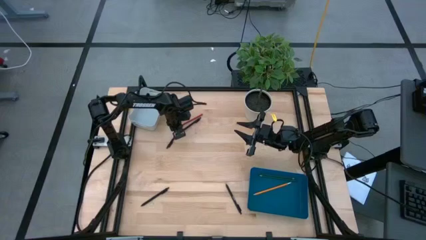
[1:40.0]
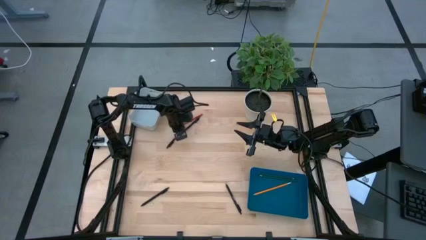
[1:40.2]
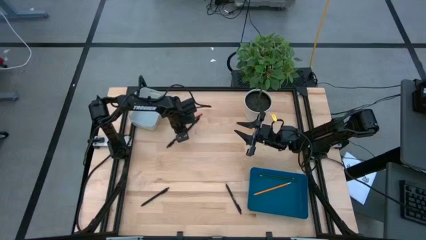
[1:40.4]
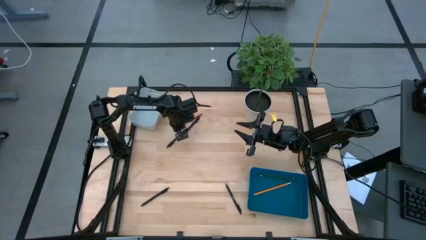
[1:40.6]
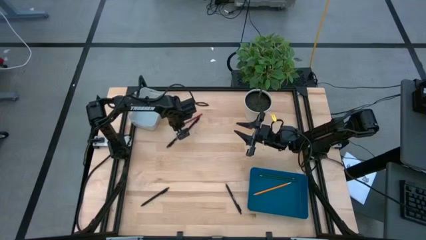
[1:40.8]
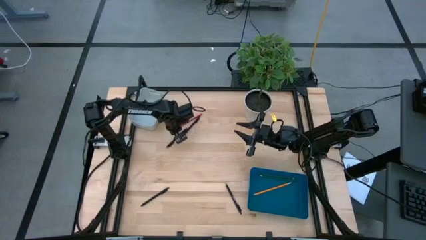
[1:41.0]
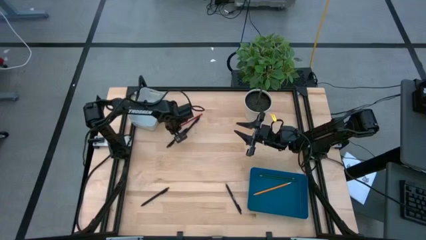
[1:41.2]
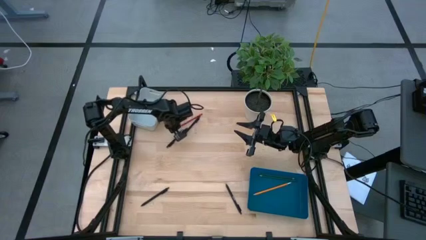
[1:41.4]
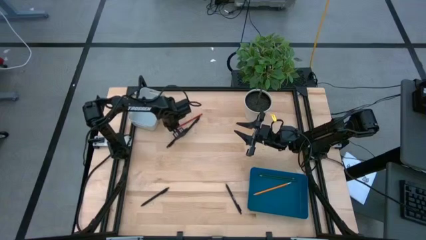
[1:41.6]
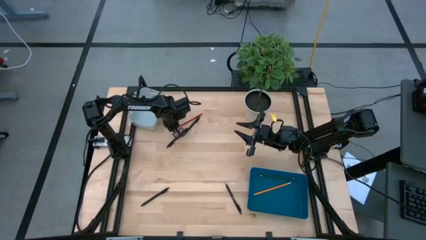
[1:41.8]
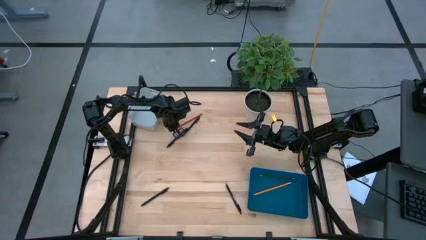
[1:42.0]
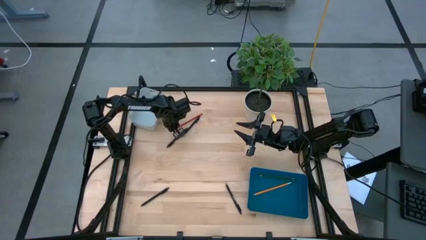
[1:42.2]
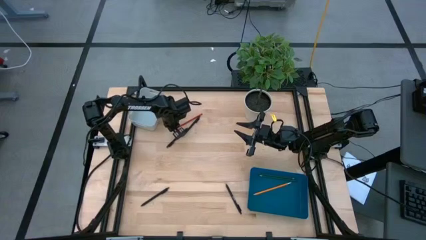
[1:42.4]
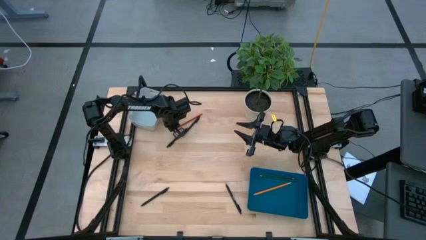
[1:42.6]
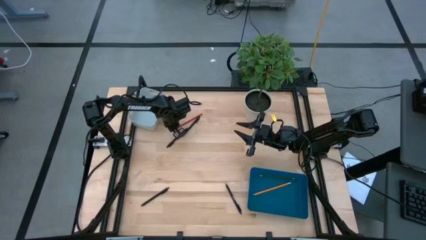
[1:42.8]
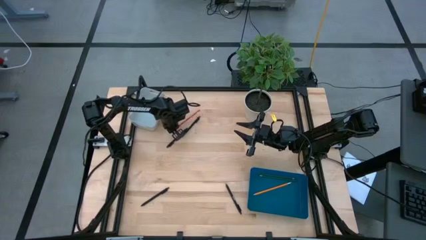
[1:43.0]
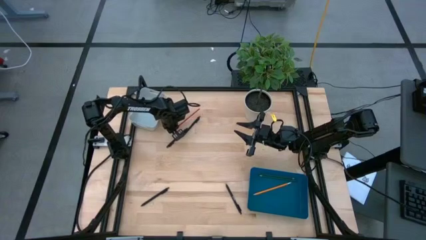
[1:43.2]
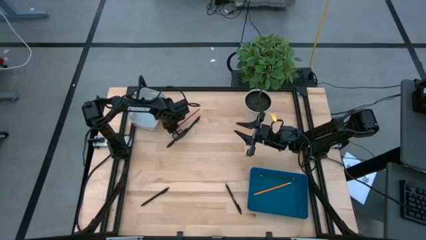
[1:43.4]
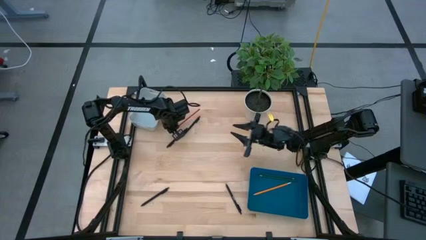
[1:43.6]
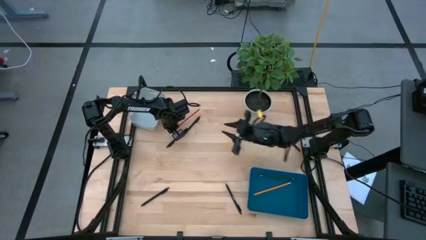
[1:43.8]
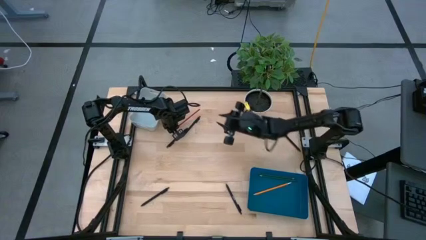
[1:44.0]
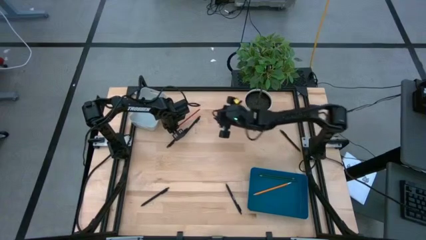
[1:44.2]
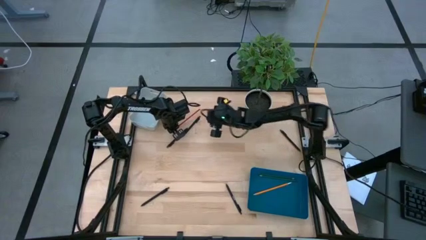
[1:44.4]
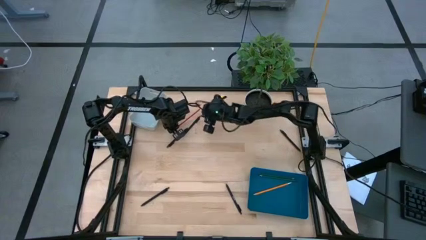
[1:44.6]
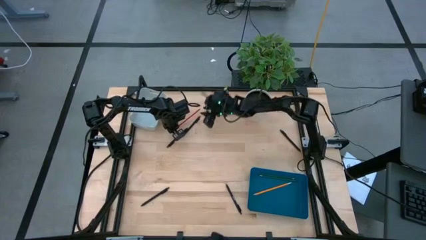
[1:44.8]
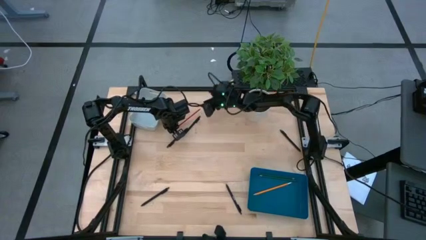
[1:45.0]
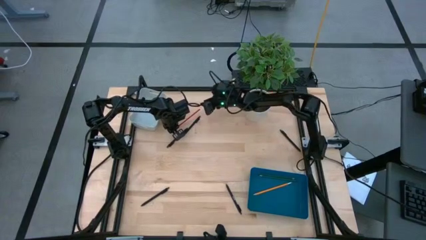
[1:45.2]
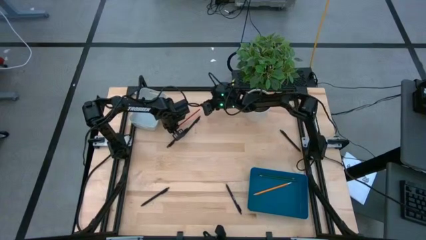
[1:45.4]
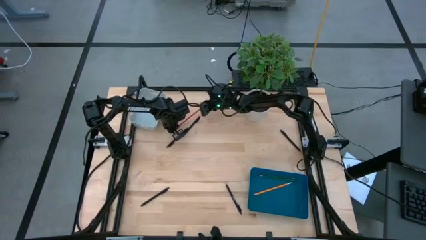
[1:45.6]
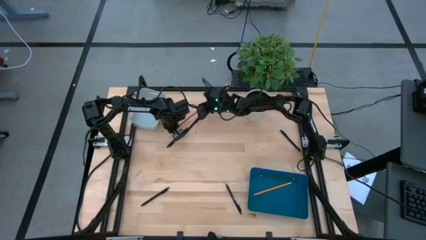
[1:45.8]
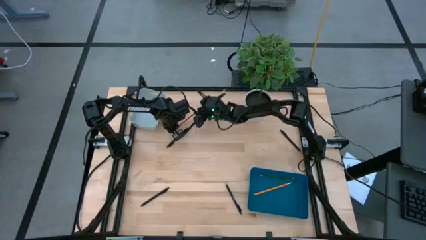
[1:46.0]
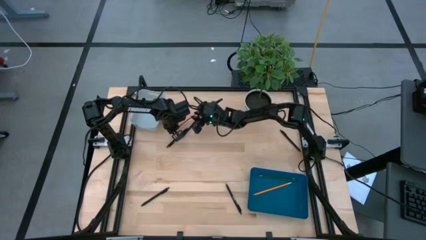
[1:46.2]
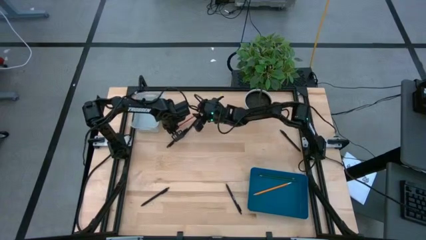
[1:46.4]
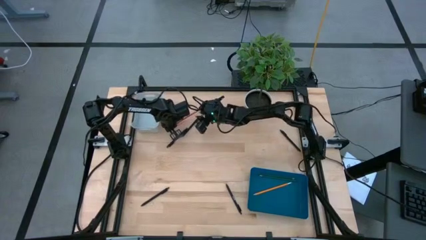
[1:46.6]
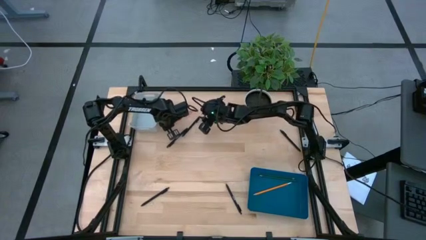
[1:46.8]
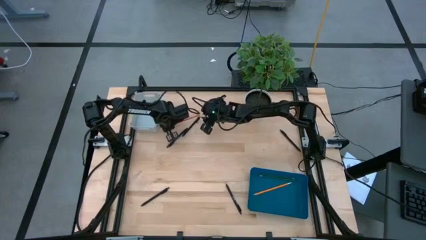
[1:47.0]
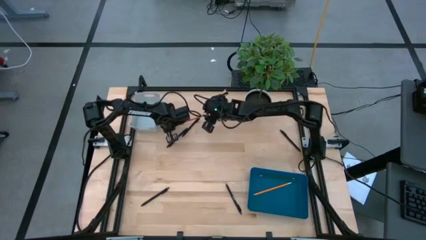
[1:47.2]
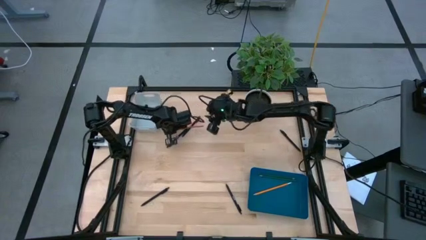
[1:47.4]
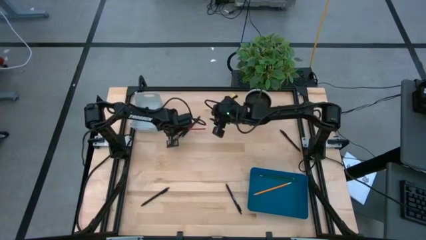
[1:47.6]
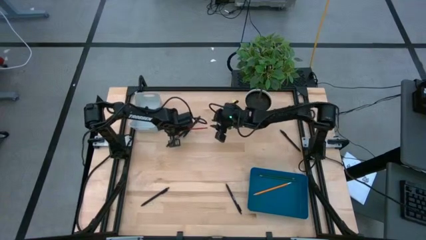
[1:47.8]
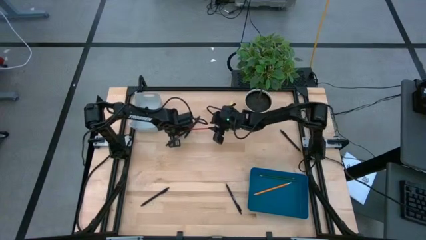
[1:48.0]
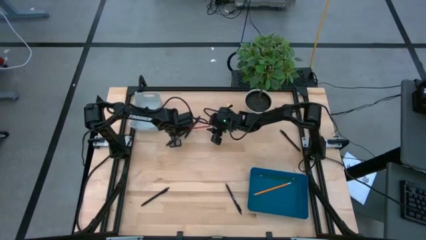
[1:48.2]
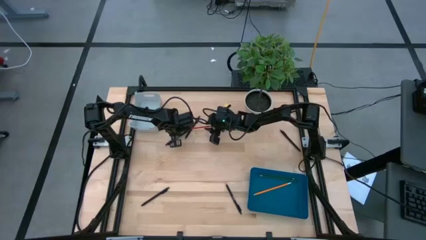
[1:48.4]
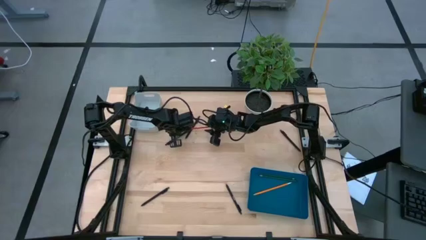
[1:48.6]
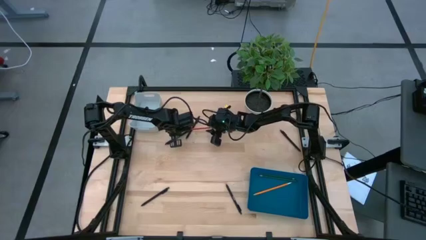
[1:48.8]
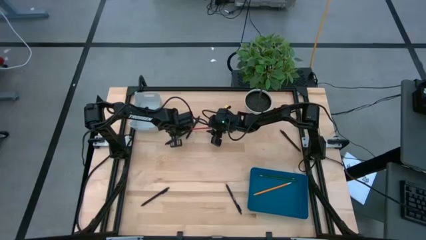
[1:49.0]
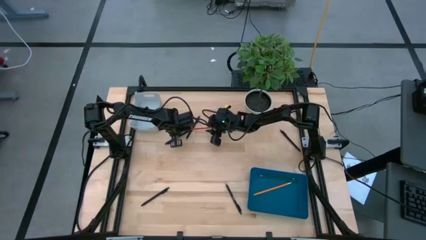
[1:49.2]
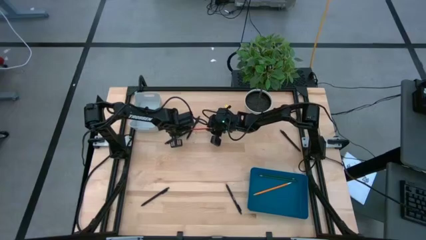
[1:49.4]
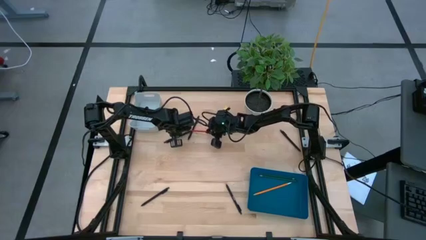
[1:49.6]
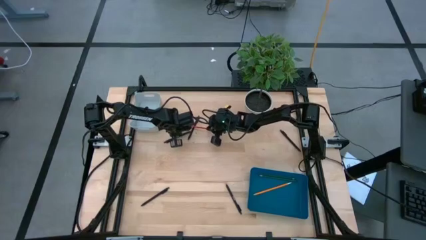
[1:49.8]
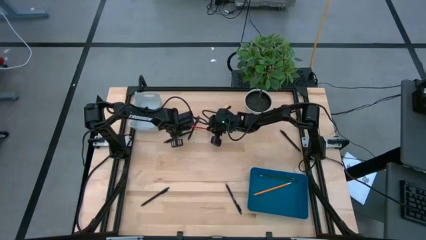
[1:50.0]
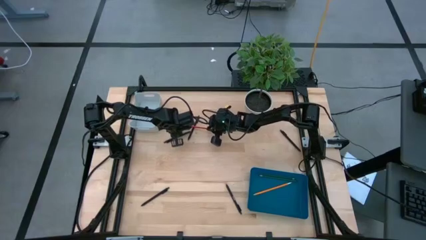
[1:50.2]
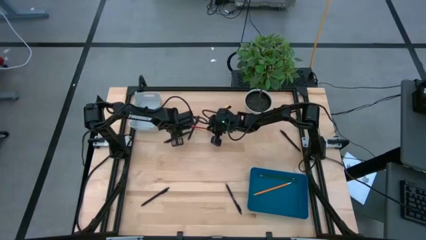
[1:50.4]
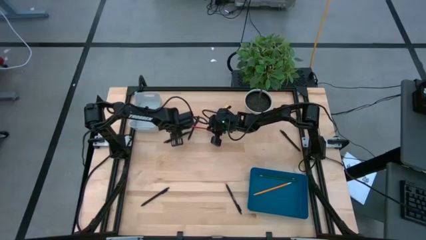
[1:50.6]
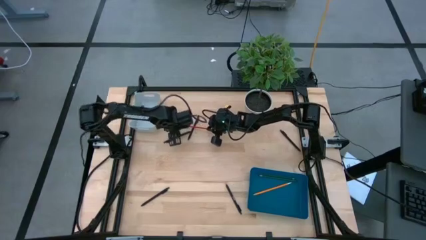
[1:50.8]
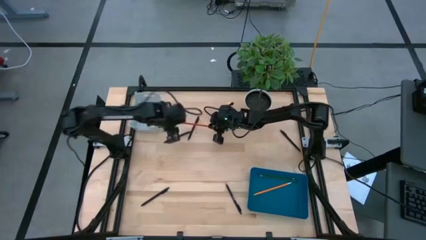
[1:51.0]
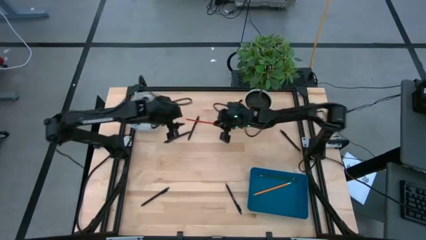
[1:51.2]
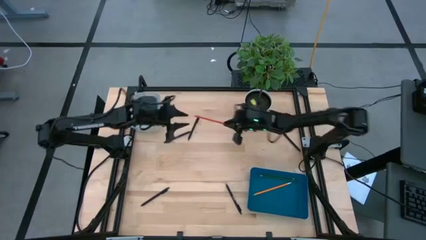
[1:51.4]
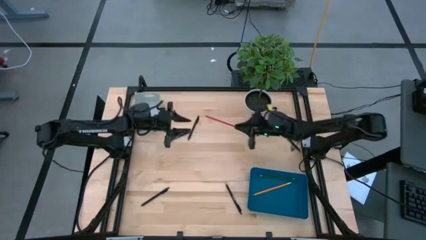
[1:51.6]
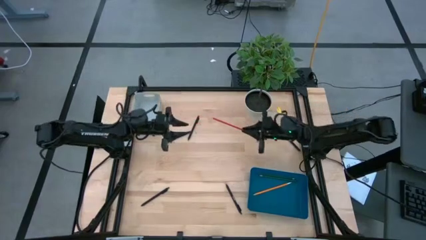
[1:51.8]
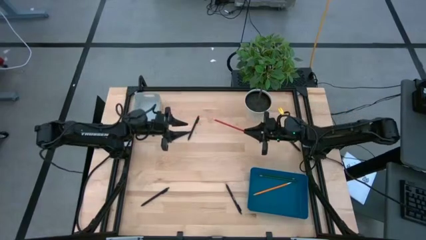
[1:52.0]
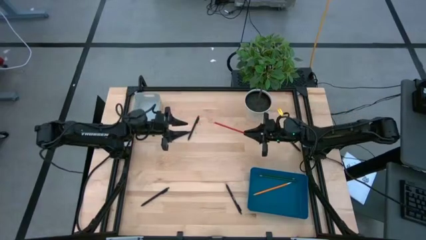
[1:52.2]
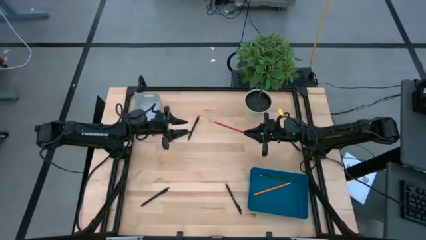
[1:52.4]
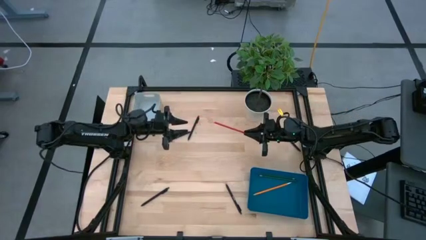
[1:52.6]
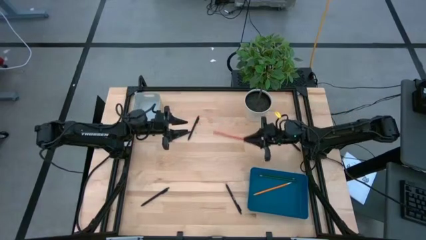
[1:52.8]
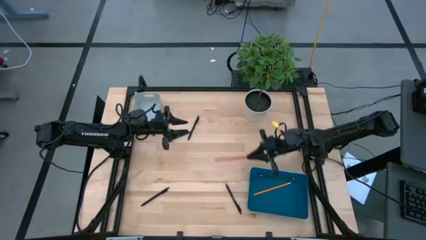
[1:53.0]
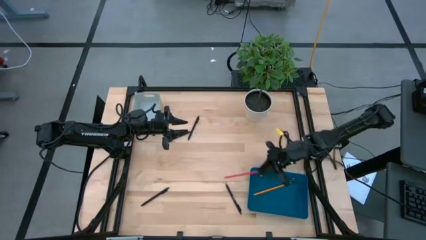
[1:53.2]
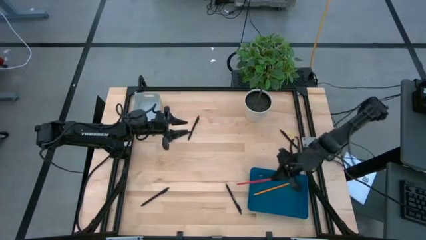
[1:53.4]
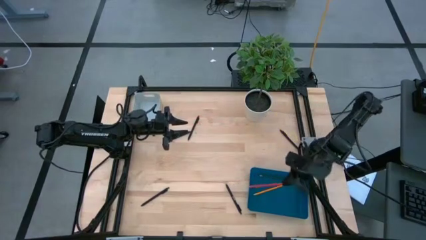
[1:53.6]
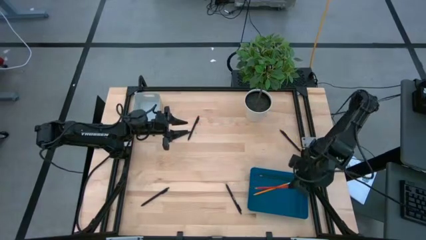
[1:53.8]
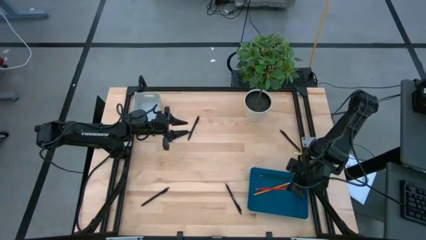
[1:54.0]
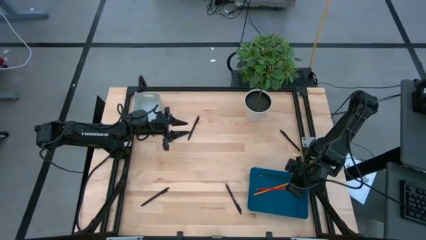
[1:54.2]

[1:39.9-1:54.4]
Task: Sort pens & pencils
Put the red pencil into the blue bin
